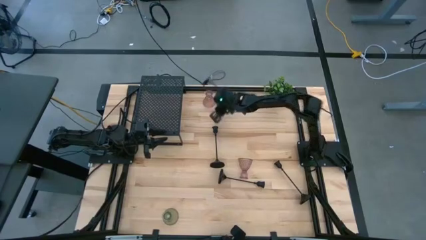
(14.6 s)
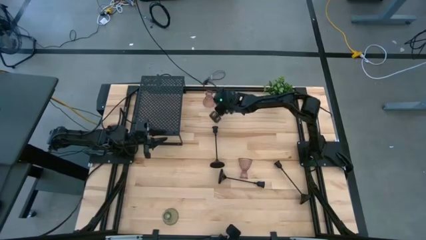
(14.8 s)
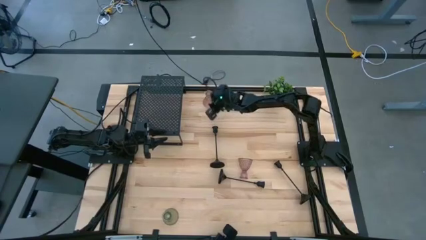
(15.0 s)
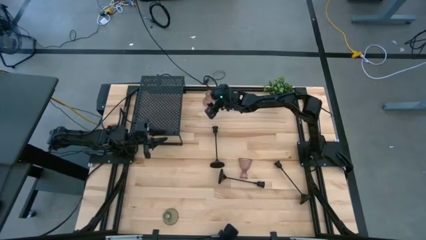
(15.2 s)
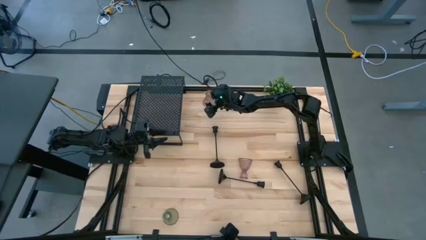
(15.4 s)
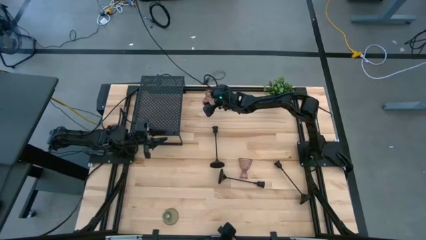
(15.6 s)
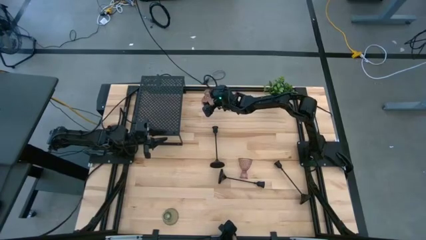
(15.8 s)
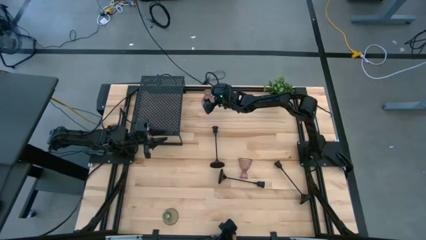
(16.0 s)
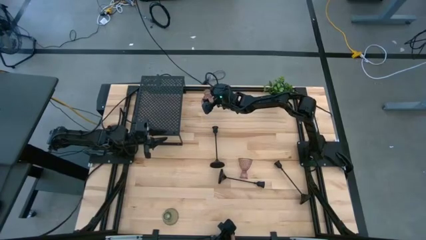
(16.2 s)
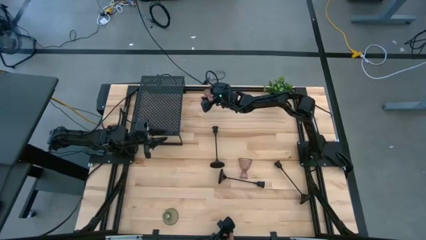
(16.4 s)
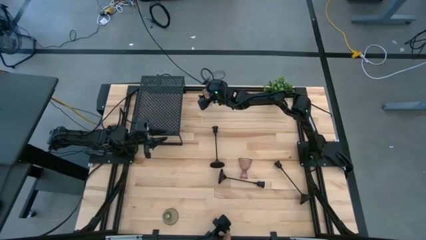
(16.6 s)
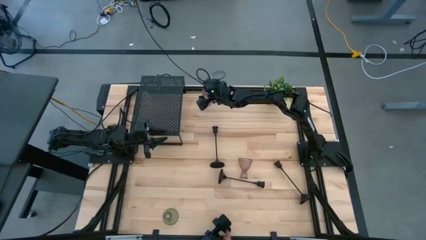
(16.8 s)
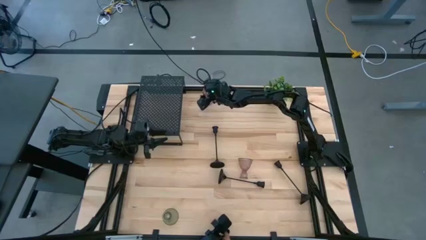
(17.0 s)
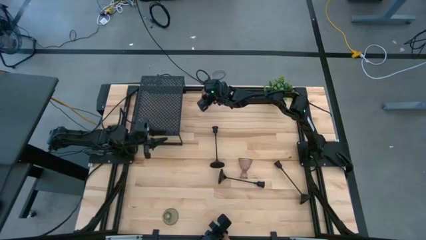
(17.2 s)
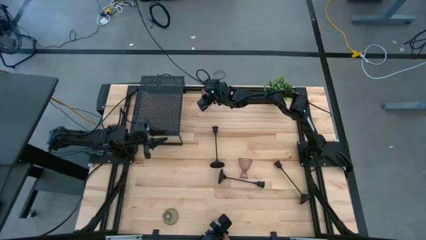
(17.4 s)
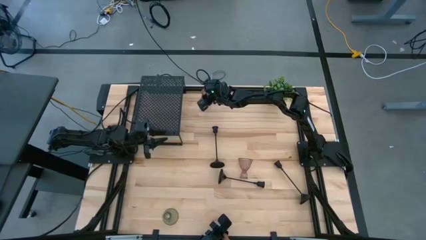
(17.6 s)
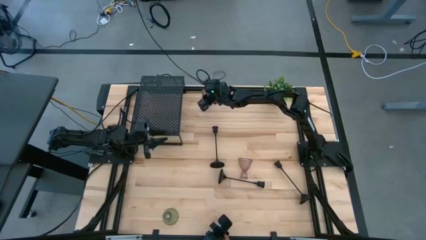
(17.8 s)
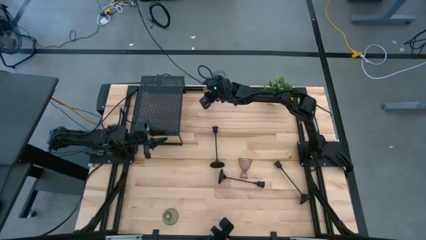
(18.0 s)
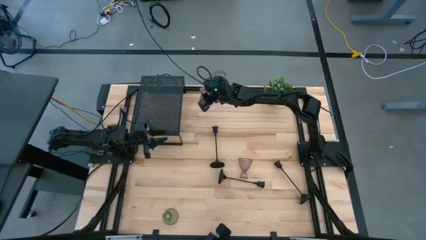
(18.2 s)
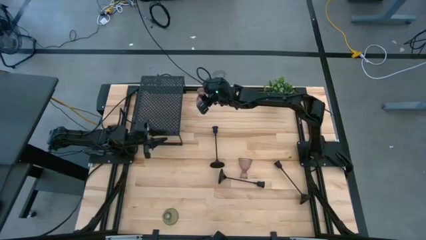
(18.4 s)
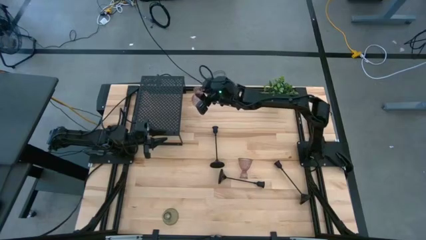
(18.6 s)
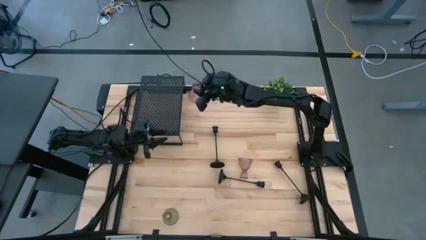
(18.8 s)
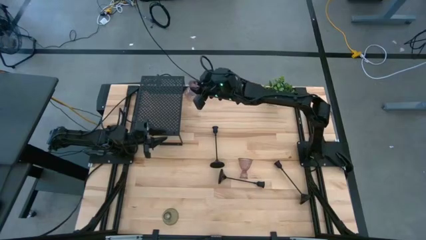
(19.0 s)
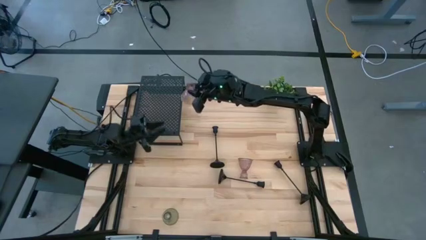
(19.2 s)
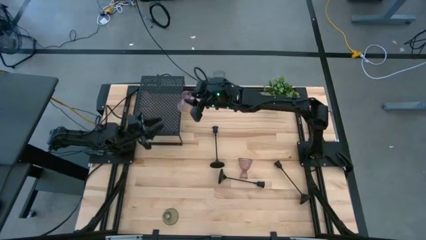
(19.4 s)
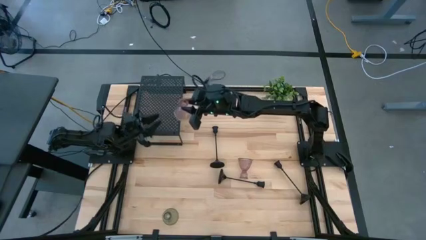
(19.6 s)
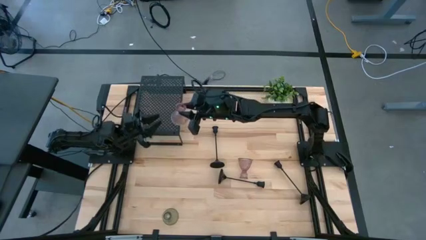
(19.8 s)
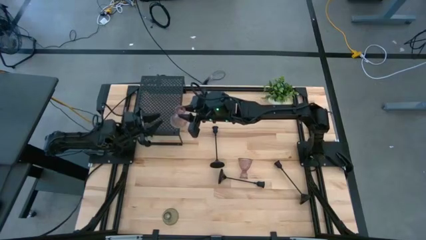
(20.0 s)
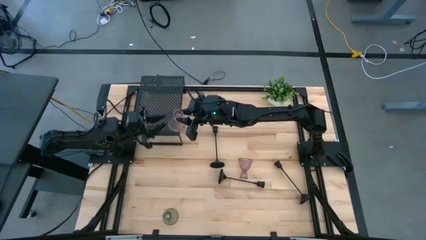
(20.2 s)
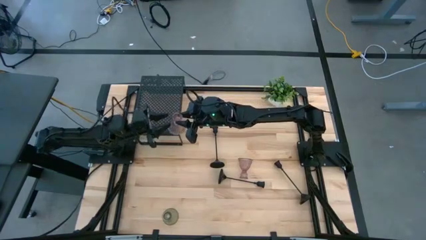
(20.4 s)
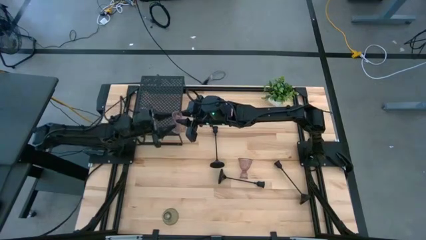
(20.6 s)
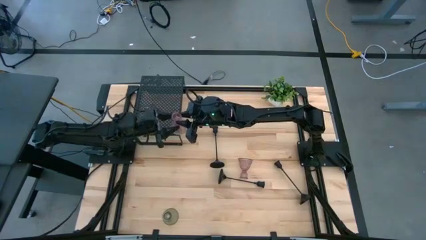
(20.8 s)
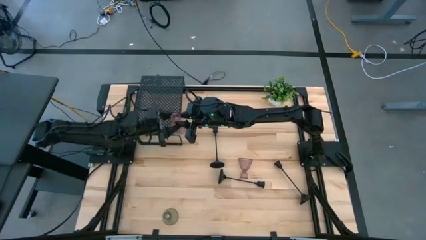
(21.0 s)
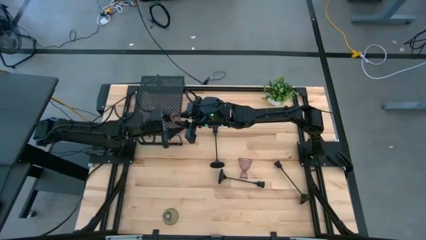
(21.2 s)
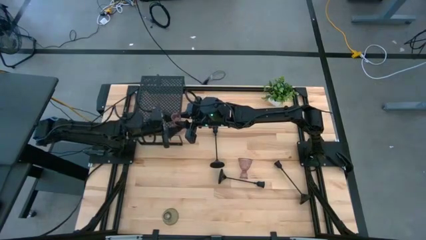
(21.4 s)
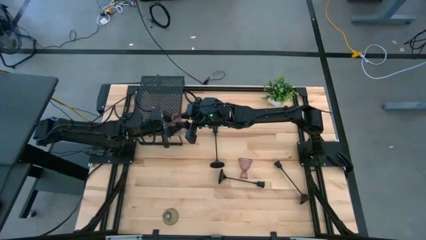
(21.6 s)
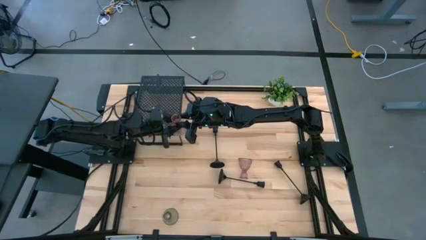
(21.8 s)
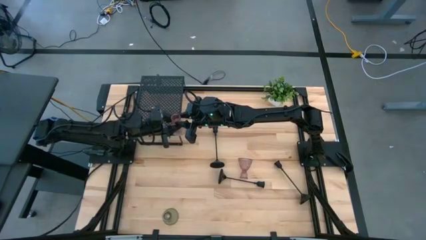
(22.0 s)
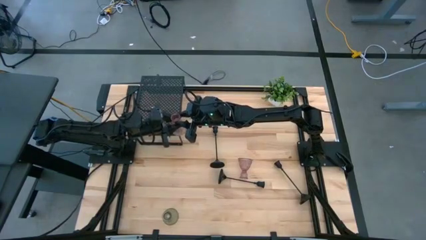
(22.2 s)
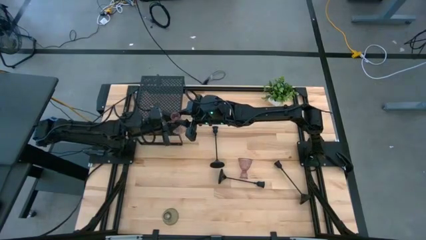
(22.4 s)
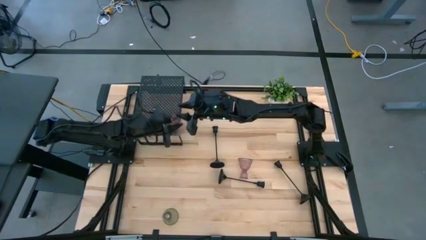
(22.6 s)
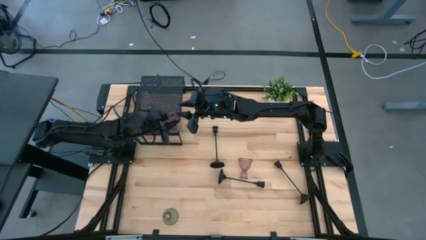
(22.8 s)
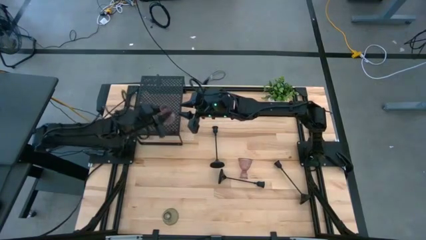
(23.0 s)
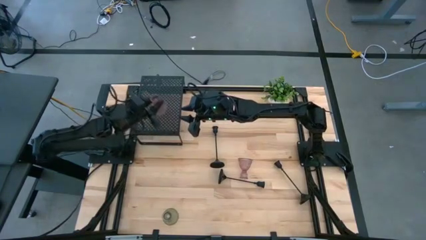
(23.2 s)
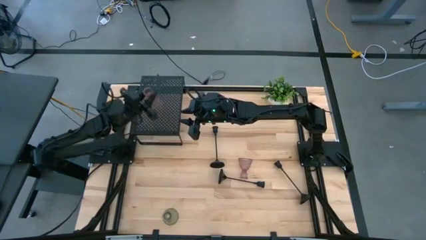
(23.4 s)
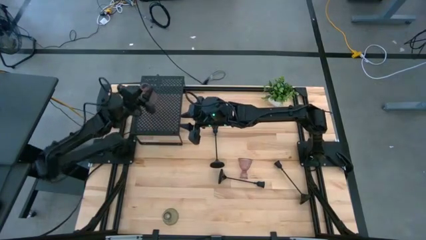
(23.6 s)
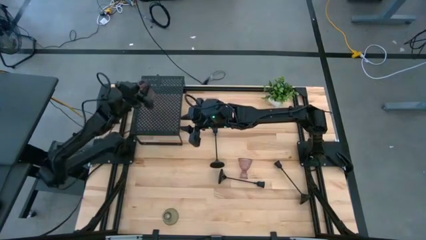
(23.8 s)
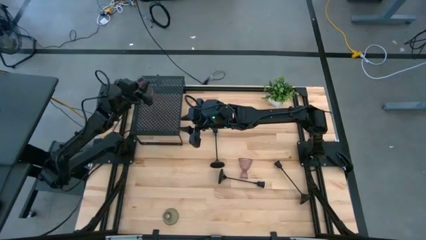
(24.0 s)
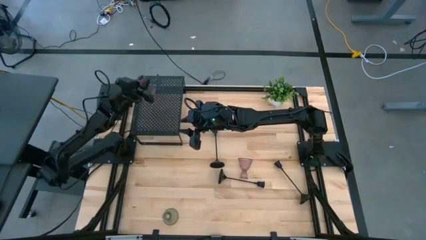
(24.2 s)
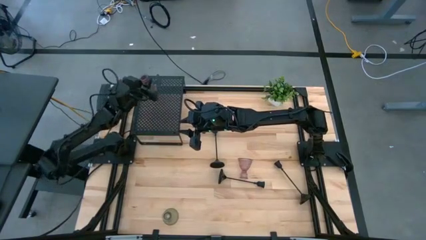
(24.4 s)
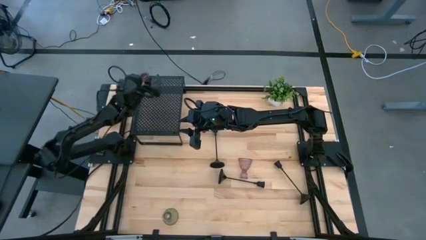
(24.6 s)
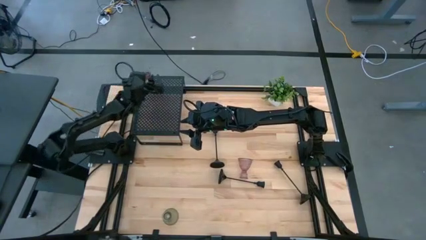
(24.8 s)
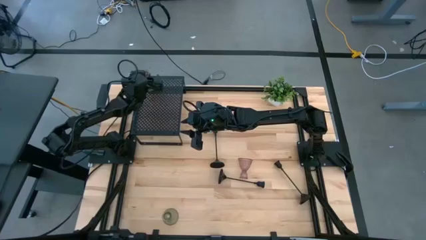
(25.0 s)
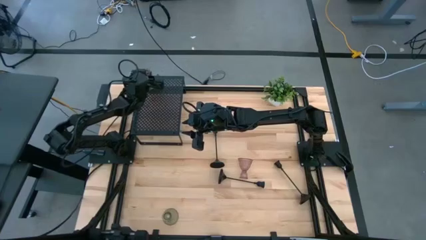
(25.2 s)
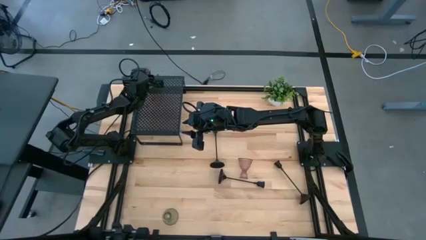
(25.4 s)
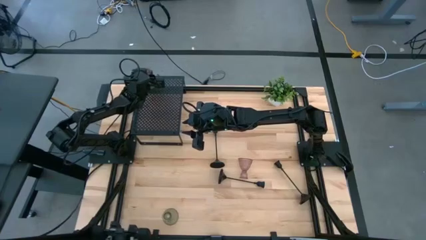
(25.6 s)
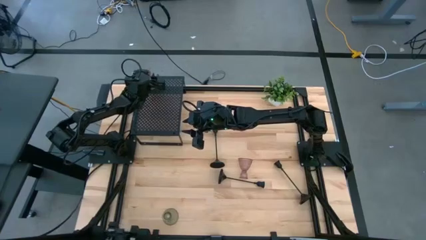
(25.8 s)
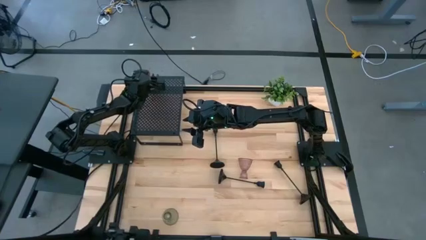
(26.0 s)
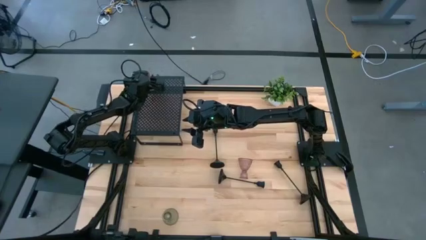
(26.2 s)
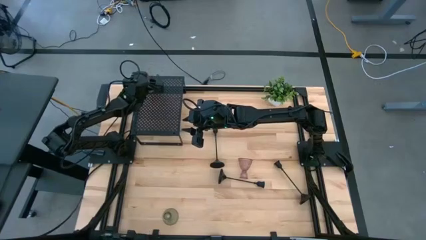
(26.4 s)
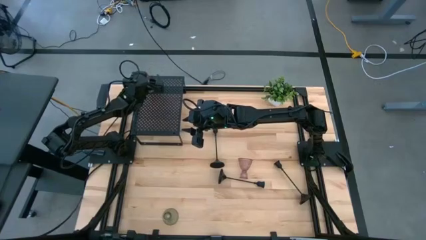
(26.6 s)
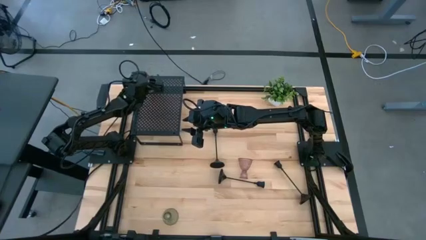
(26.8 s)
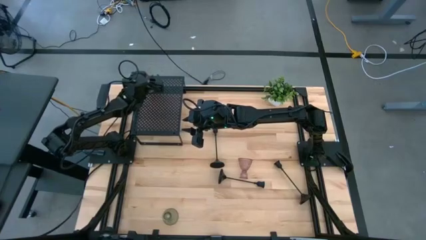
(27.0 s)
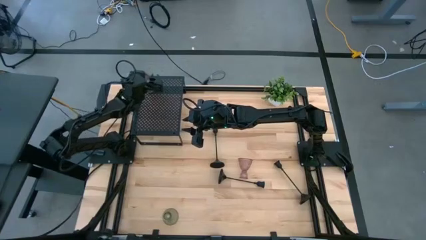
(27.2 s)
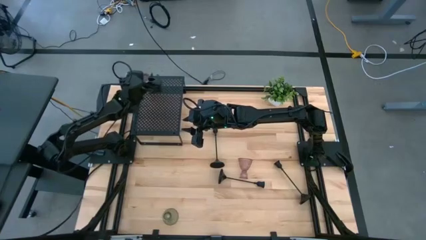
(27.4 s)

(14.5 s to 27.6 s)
Task: Pick & Place candle stick holders
Put the top pink candle holder on the shelf

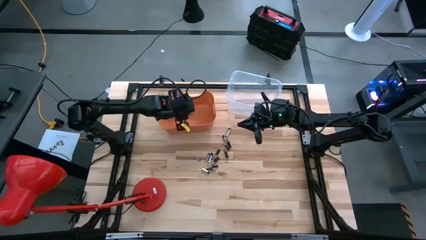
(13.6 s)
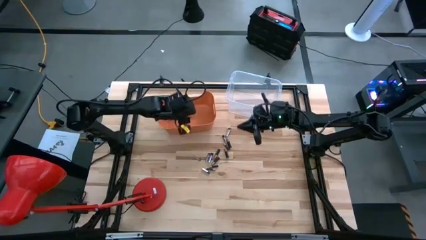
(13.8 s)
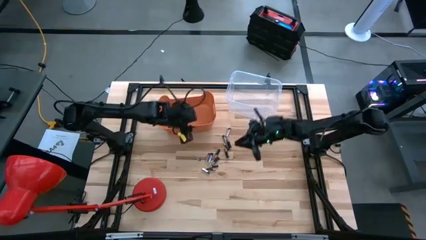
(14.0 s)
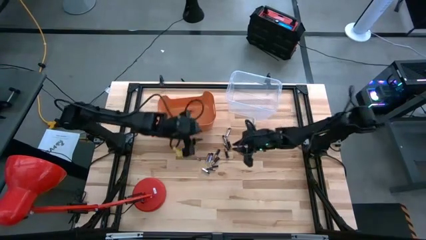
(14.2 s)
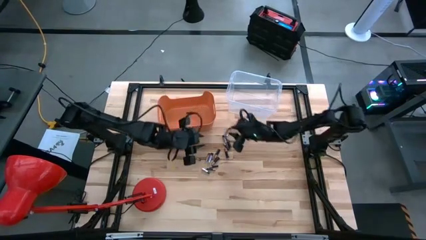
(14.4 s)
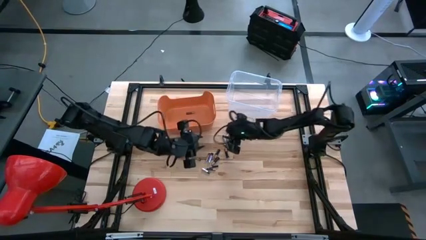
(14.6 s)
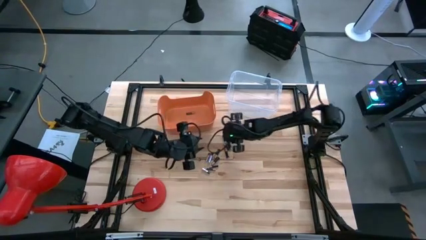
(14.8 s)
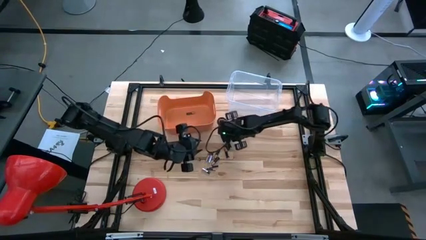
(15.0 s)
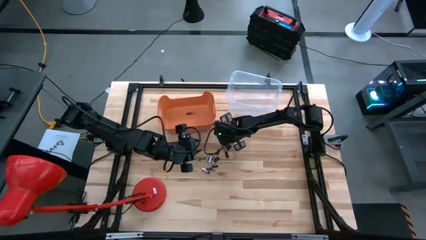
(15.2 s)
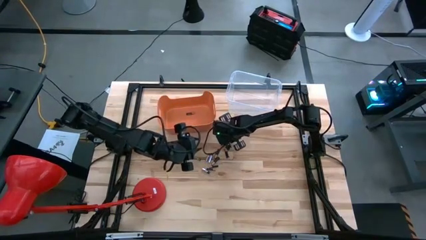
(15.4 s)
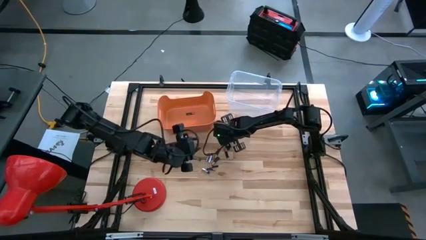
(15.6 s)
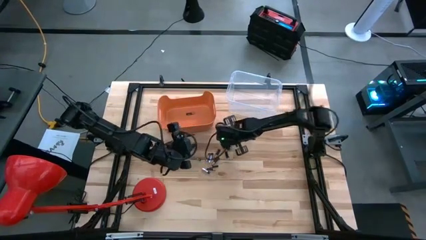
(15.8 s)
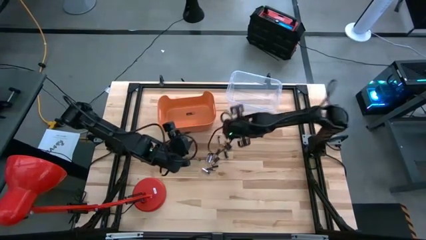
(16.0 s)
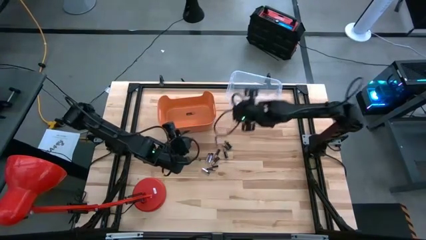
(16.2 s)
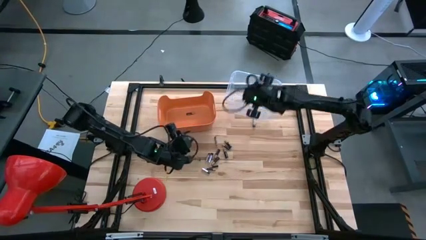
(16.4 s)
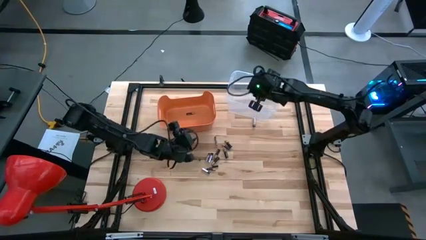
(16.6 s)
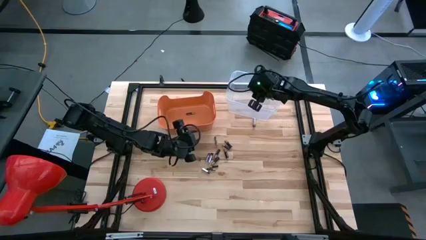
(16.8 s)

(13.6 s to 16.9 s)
Task: Sort batteries
Put the silver battery into the transparent bin

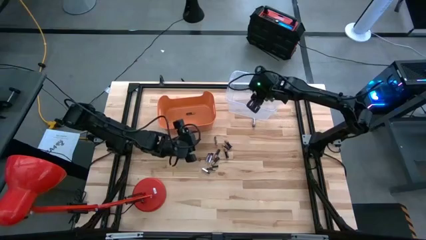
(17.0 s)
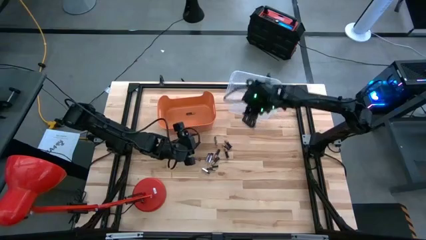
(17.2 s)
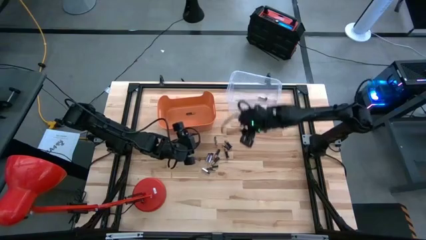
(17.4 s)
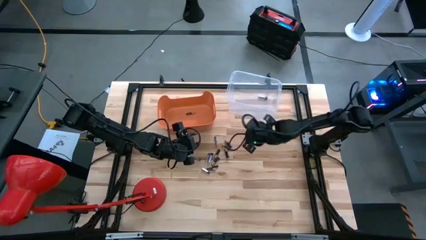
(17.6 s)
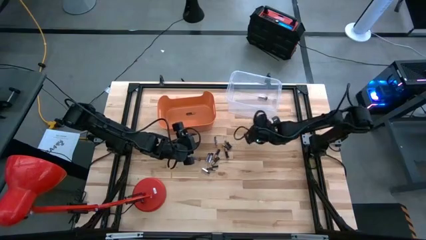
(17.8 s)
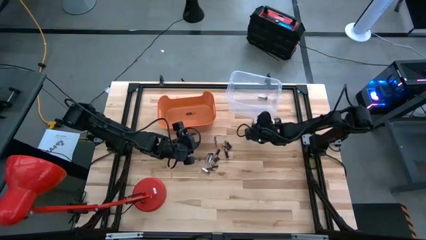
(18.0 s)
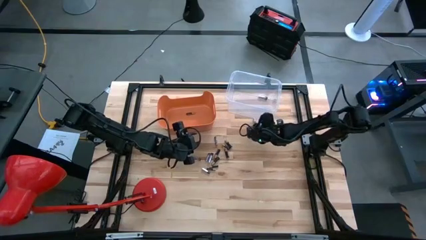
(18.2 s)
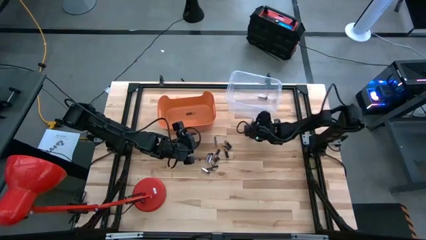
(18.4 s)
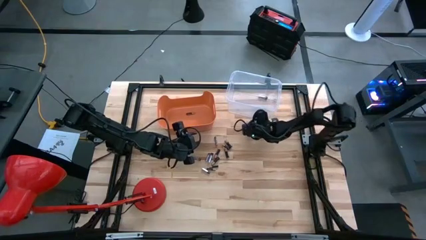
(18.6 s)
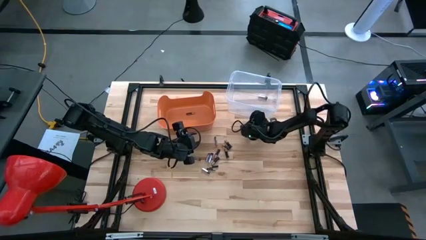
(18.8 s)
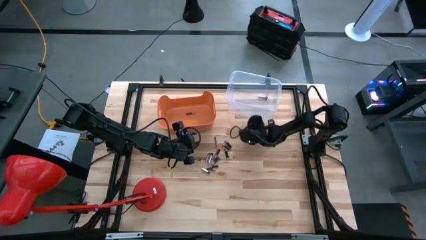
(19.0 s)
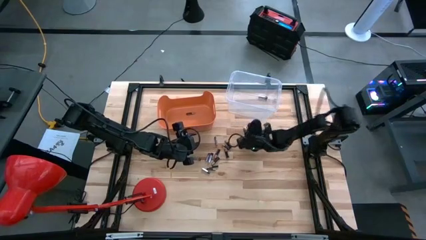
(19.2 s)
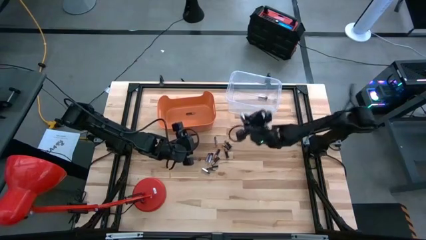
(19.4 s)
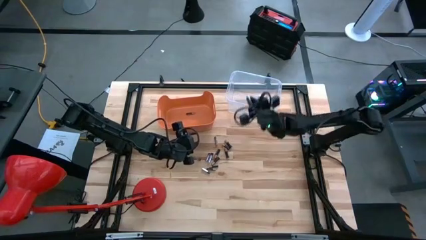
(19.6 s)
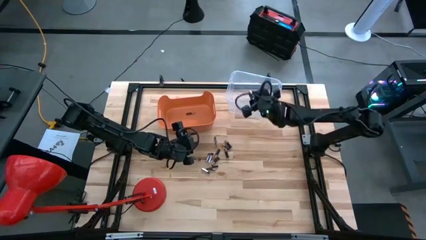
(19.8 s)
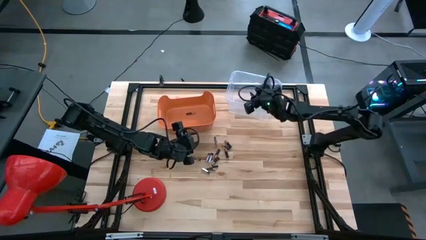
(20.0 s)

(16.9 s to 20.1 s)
Put the silver battery into the transparent bin
